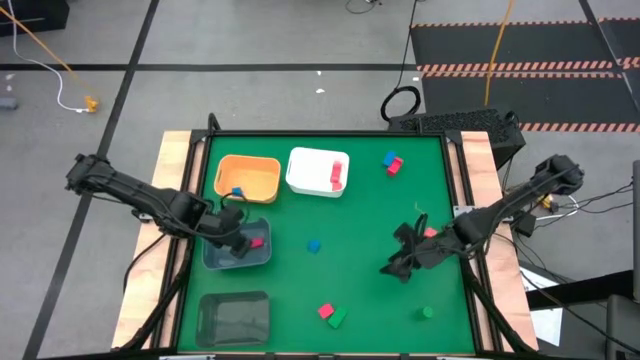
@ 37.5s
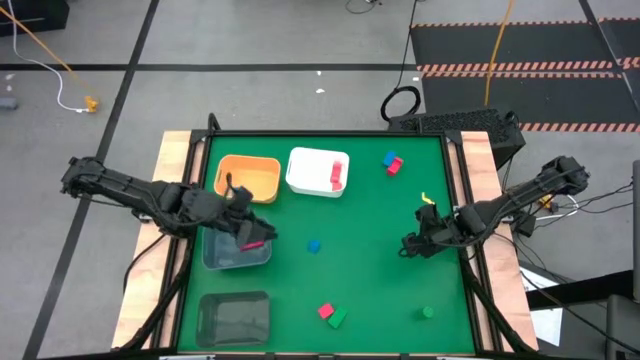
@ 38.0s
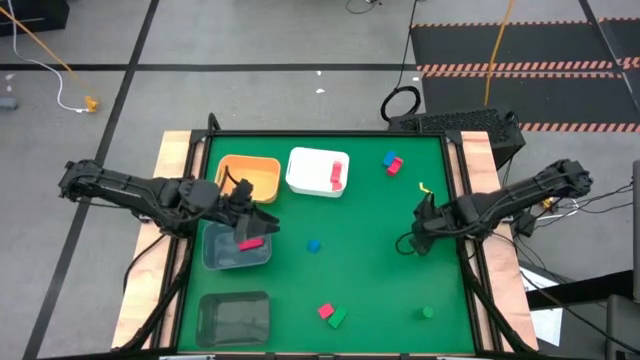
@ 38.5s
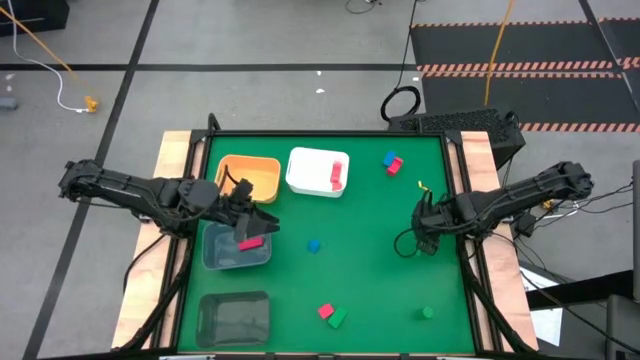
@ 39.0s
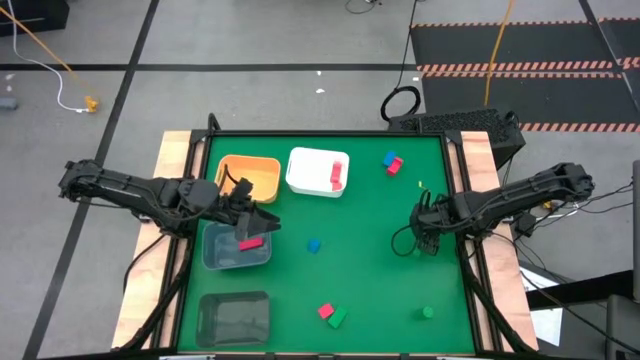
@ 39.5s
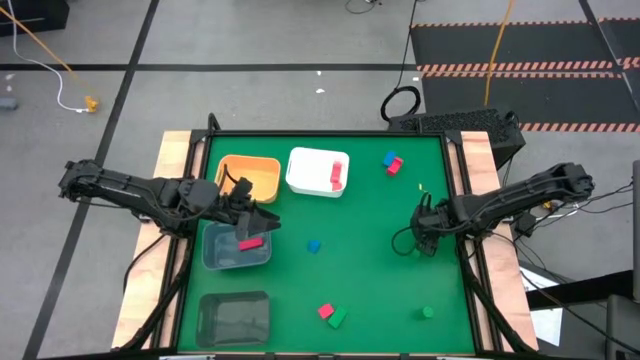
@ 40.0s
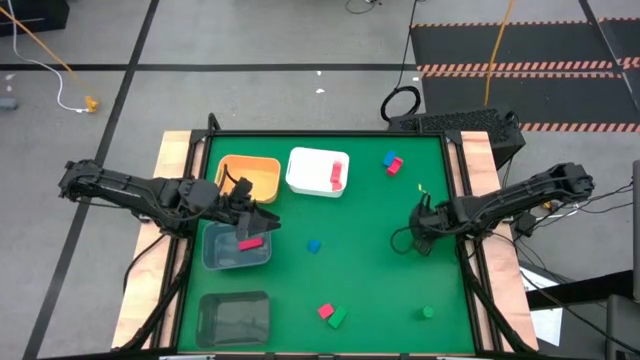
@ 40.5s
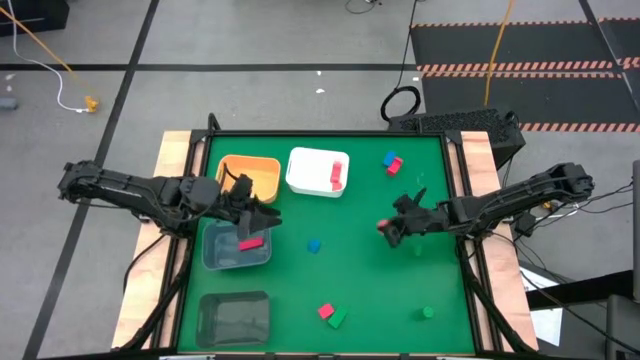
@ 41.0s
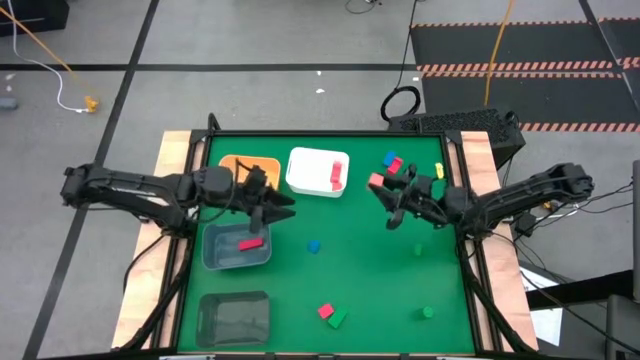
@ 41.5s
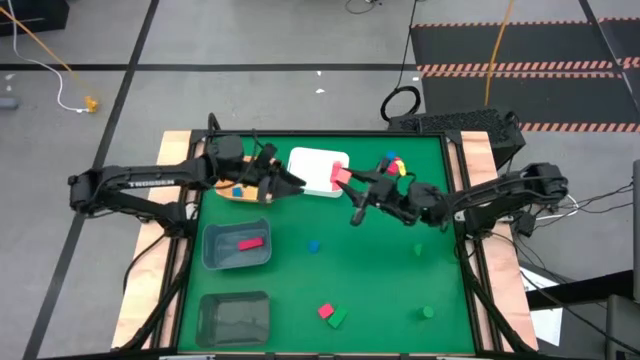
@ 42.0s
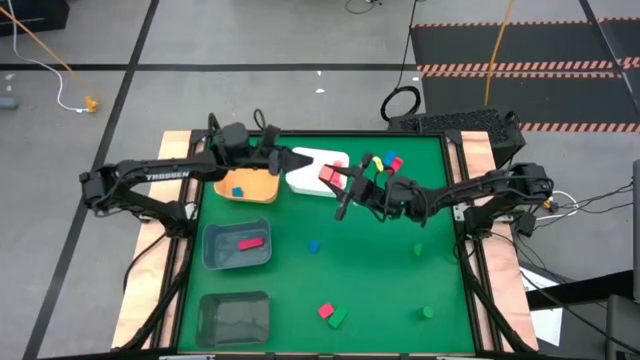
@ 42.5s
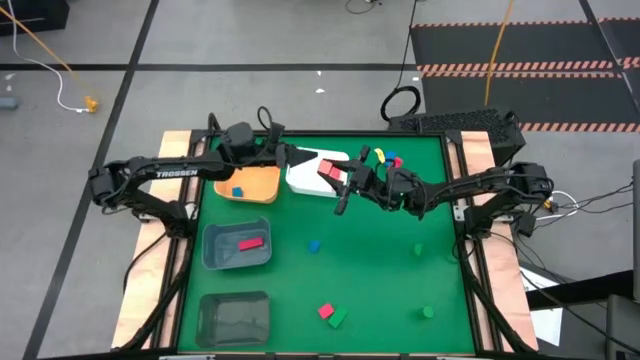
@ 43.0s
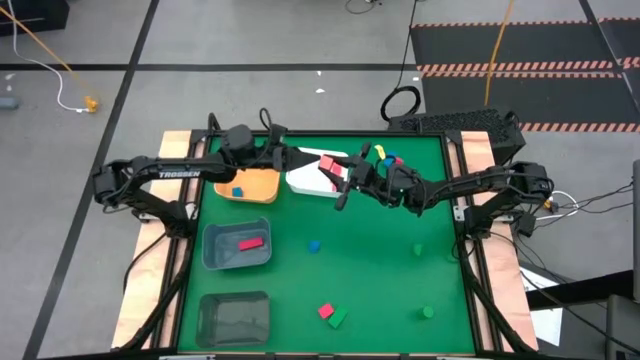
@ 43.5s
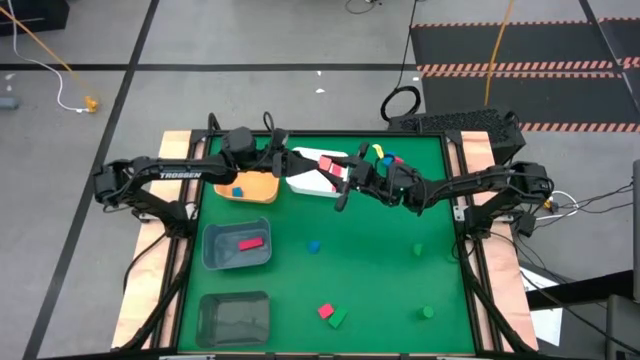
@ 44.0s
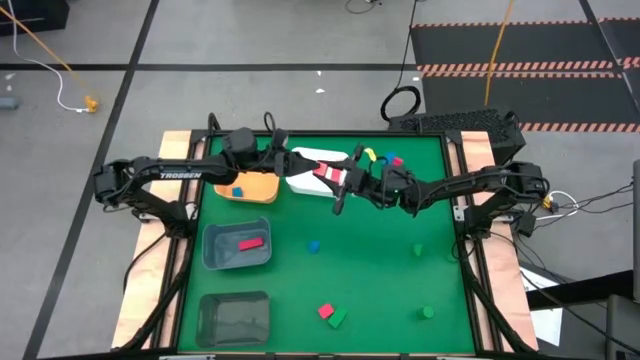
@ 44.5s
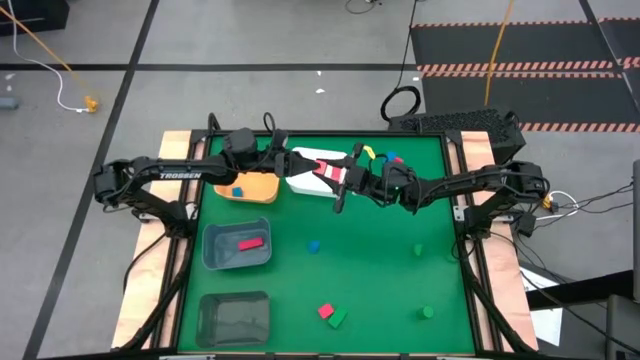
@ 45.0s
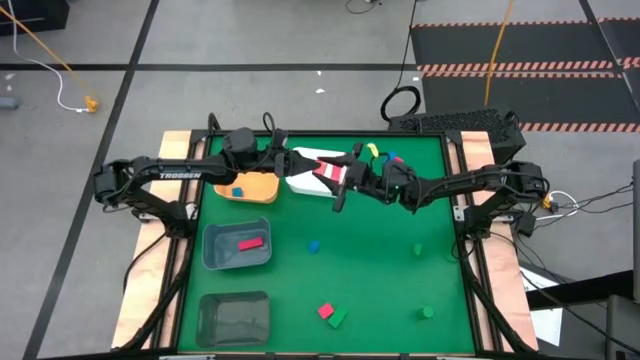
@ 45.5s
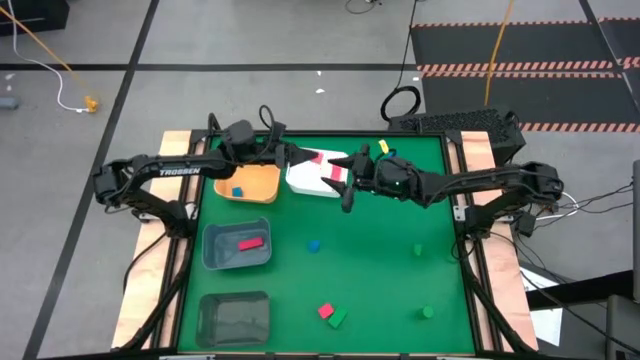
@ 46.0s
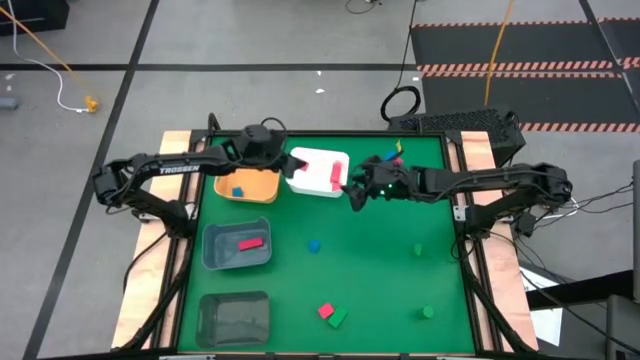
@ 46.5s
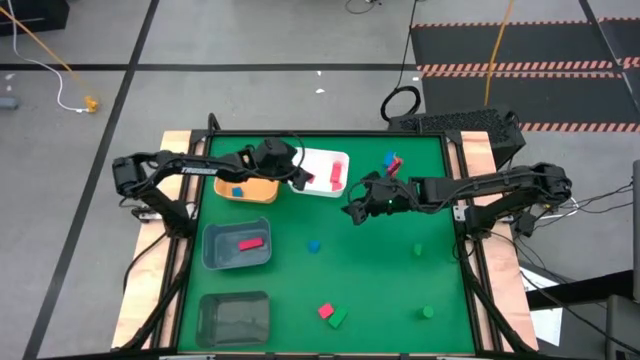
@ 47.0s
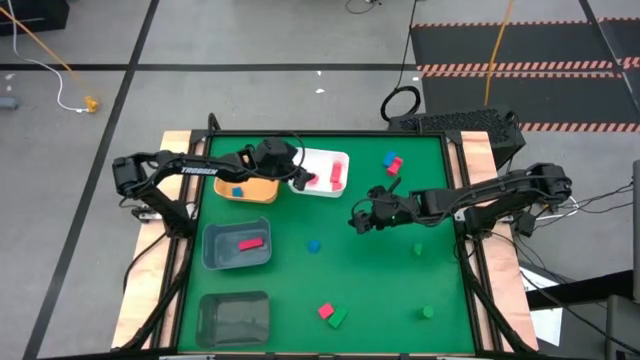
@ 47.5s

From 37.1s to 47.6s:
Task: Sort & place blocks by color
Put the pink block into the white bin

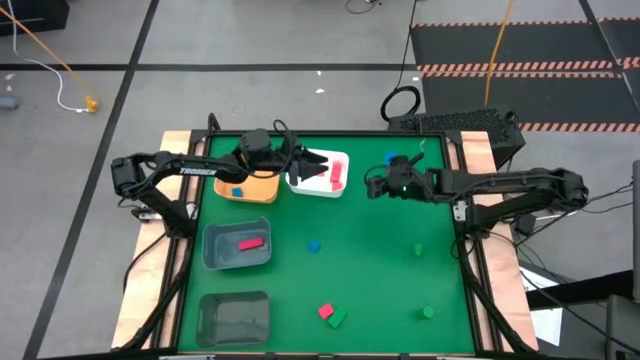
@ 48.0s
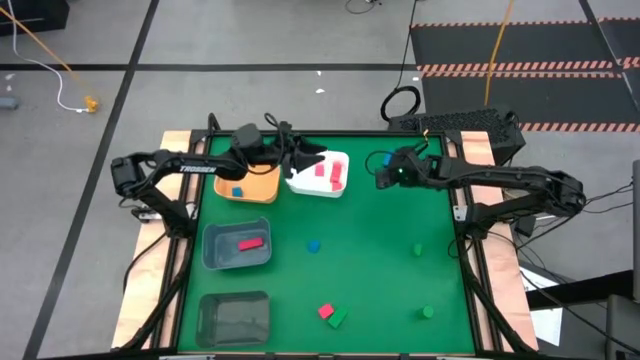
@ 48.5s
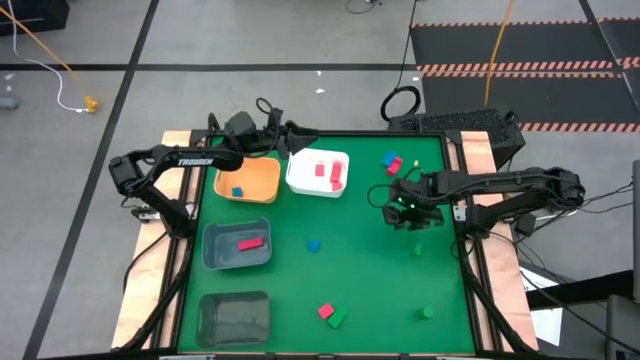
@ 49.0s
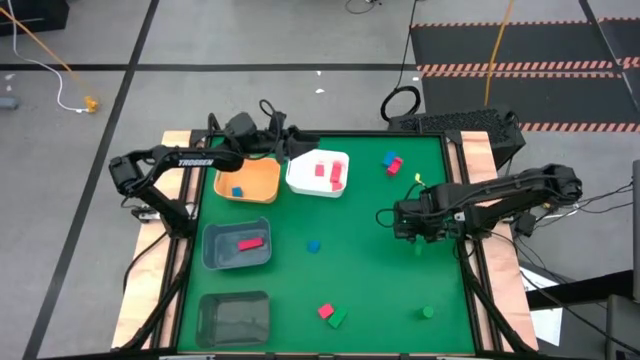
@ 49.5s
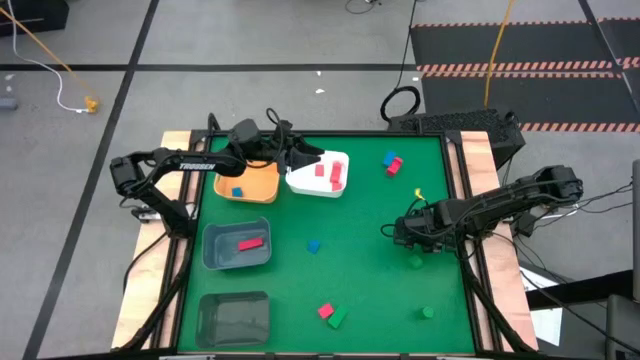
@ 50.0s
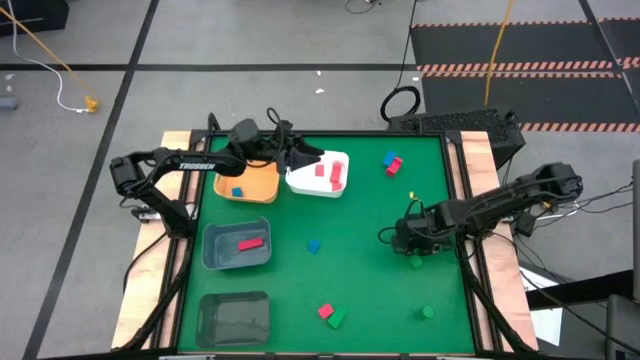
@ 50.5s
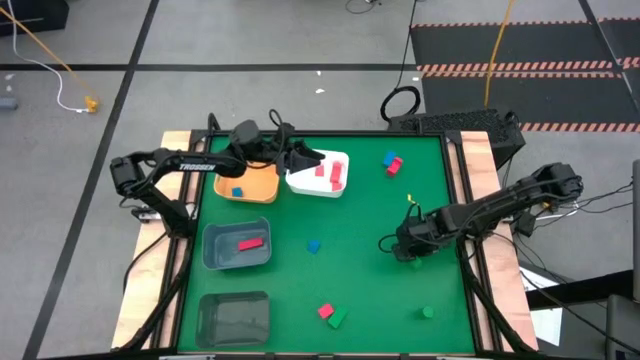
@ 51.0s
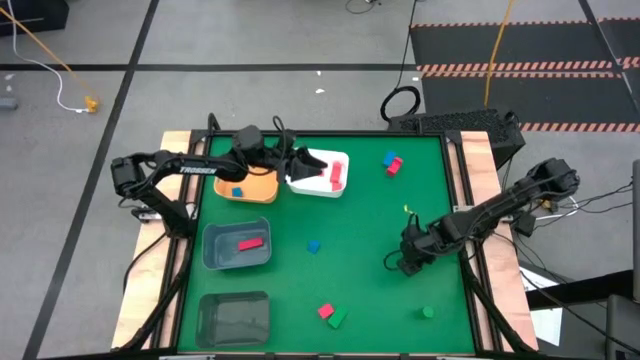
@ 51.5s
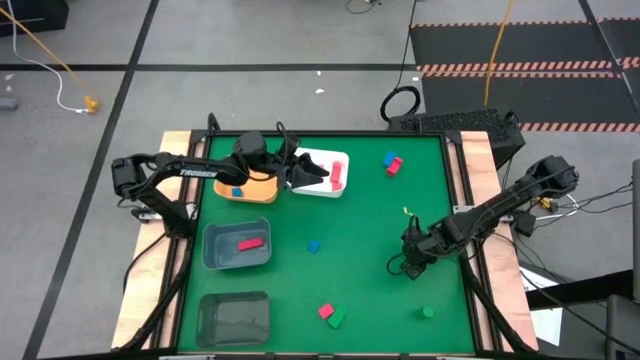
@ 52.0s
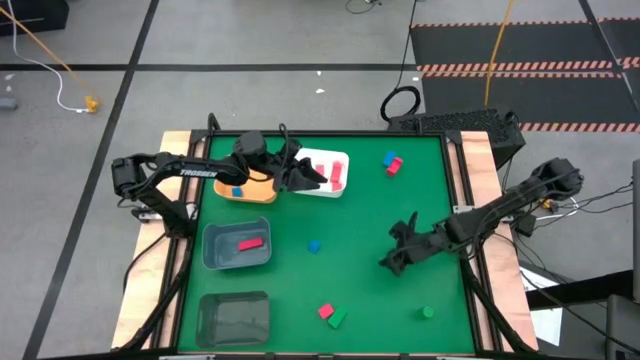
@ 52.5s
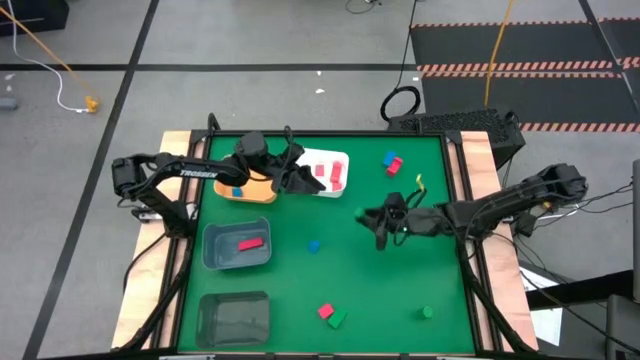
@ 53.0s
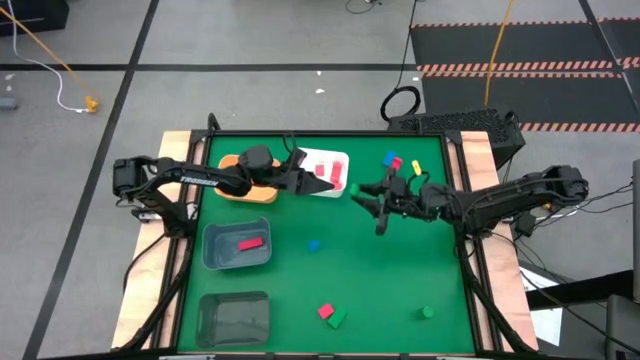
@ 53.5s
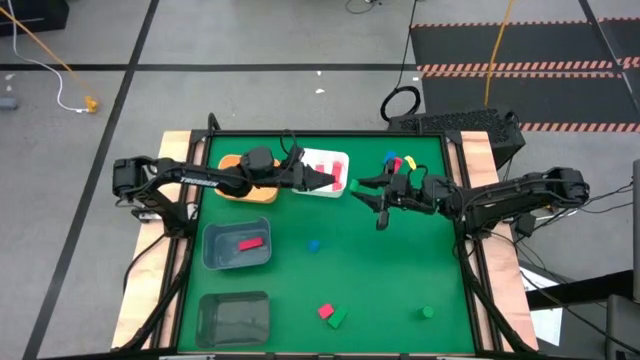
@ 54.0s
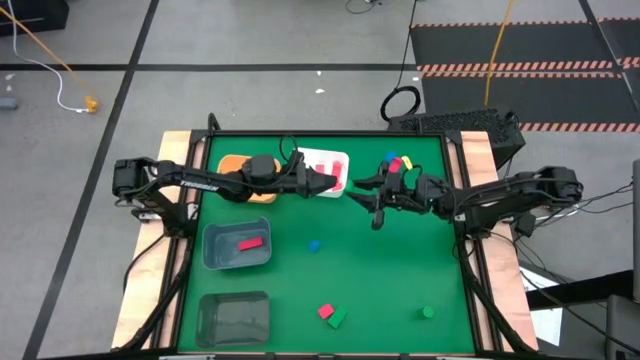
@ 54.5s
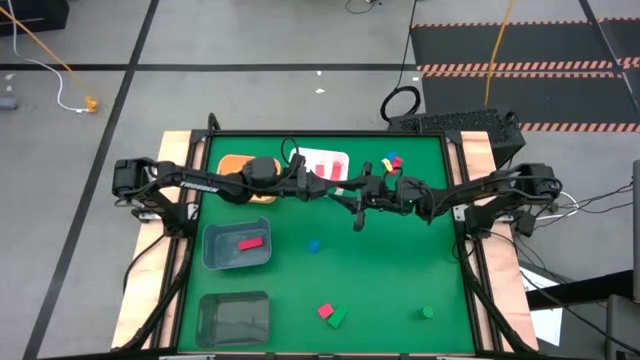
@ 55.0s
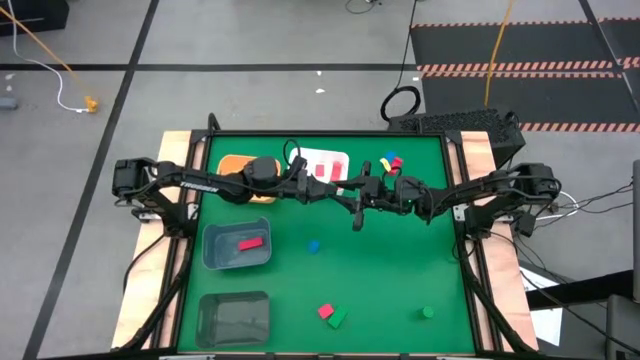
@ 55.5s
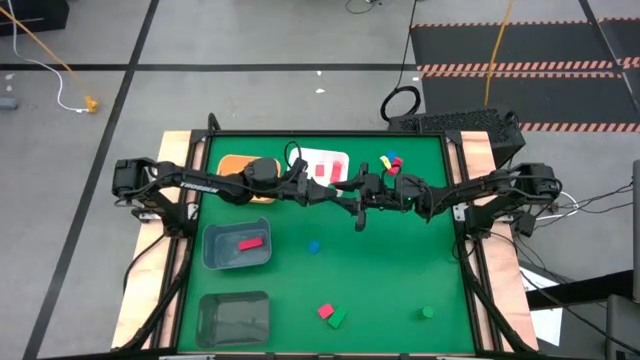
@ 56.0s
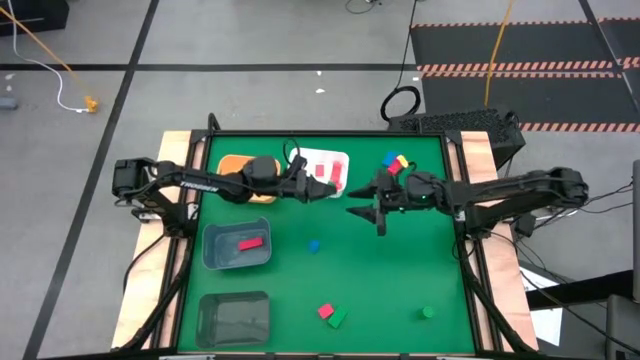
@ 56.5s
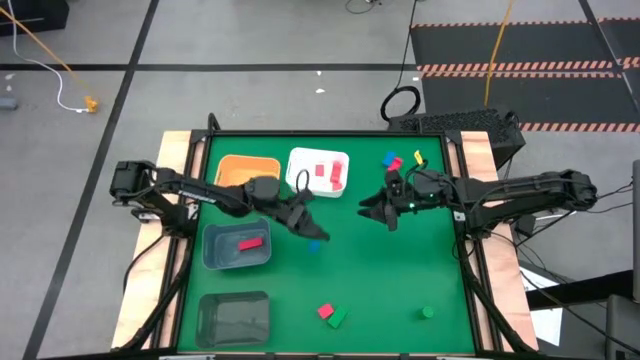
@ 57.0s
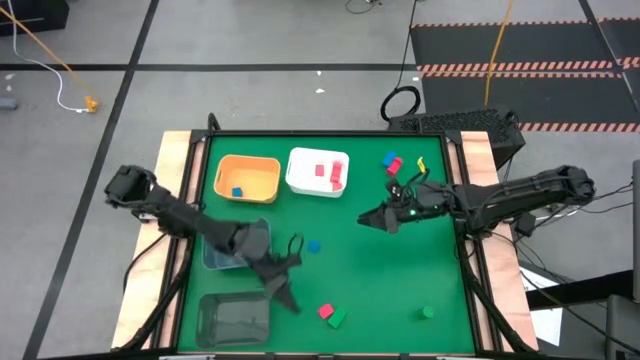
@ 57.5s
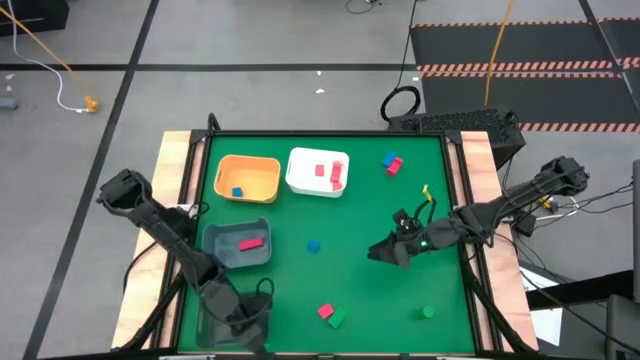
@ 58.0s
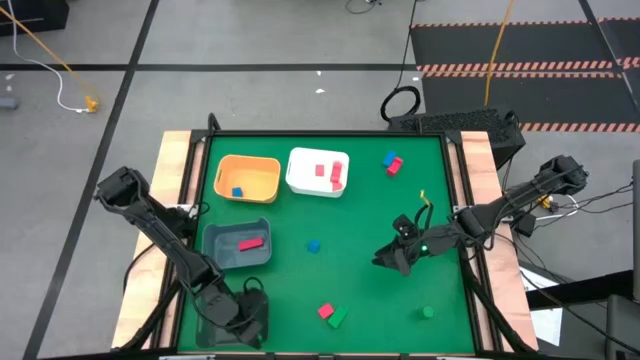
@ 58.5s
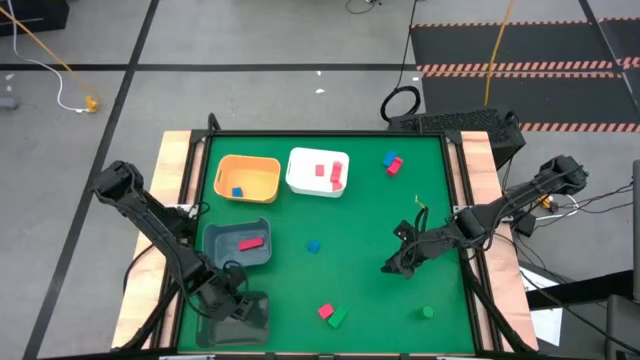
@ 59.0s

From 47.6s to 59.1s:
Put the top right green block into the black bin
